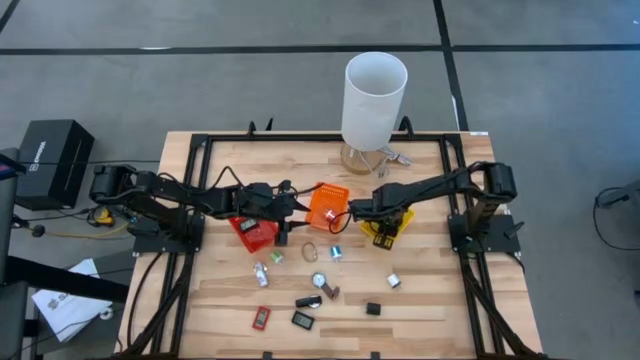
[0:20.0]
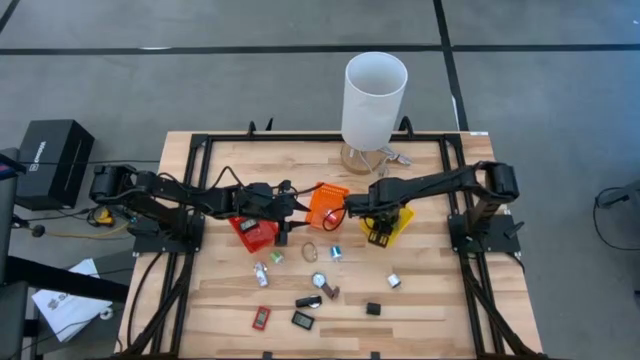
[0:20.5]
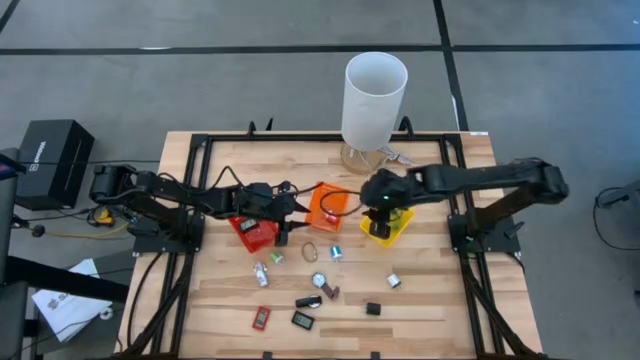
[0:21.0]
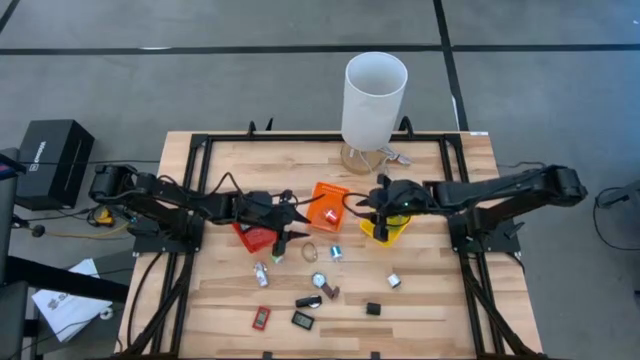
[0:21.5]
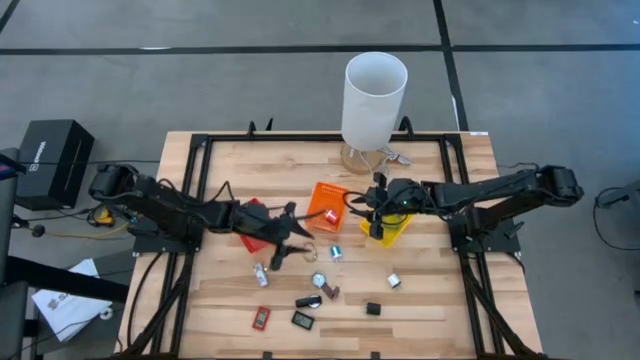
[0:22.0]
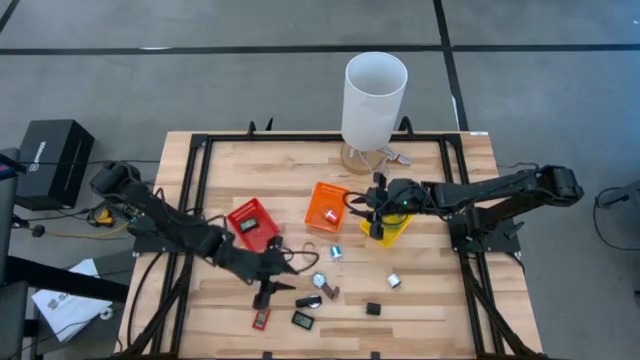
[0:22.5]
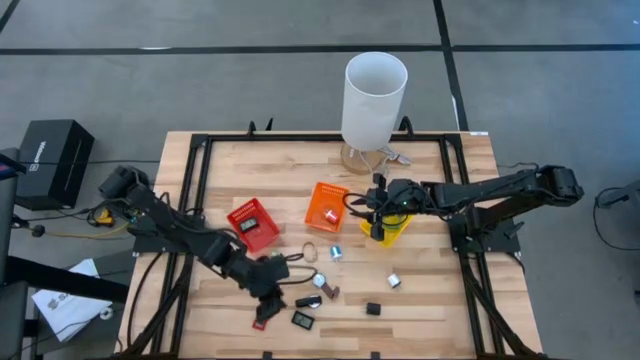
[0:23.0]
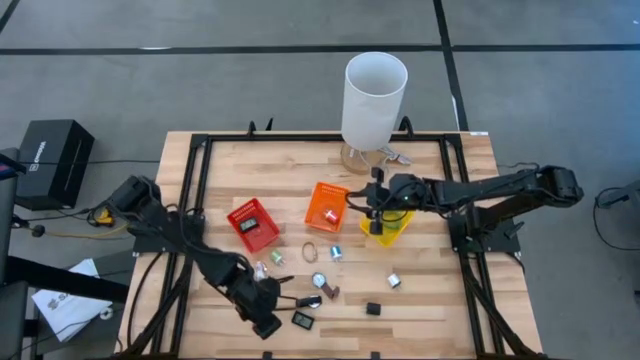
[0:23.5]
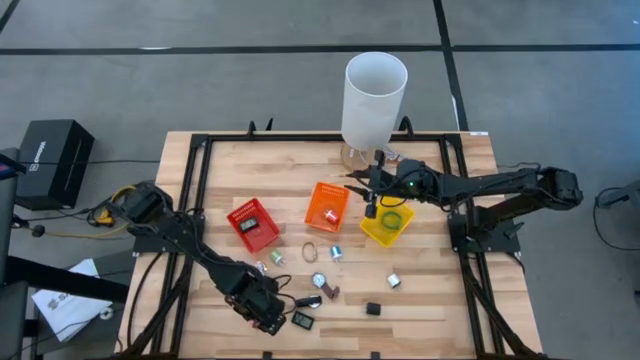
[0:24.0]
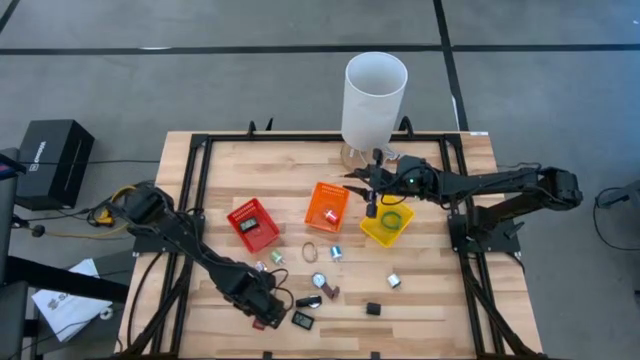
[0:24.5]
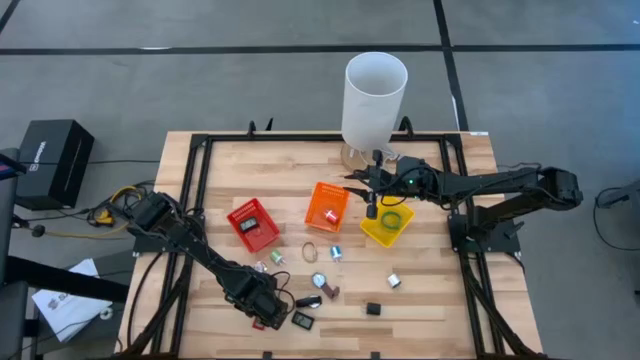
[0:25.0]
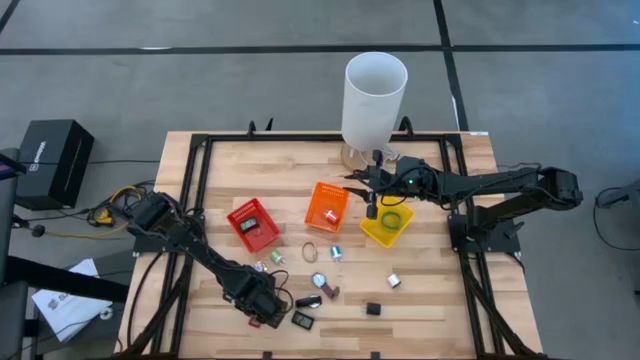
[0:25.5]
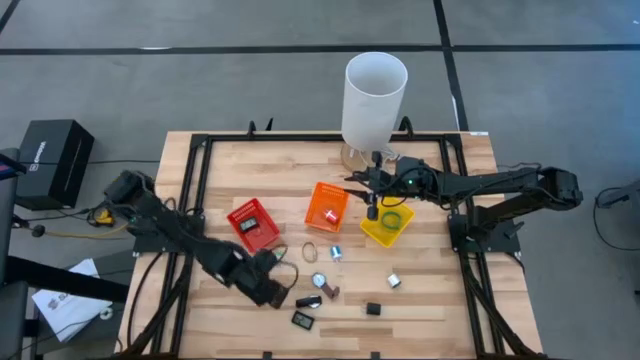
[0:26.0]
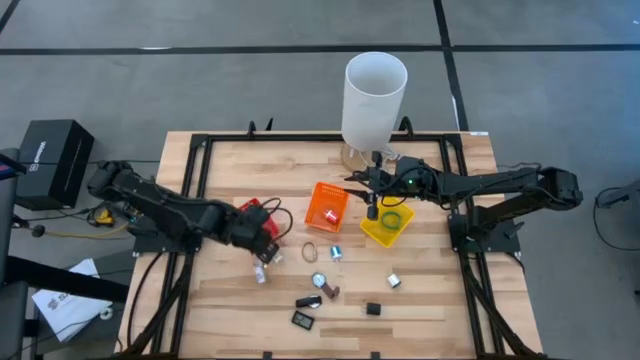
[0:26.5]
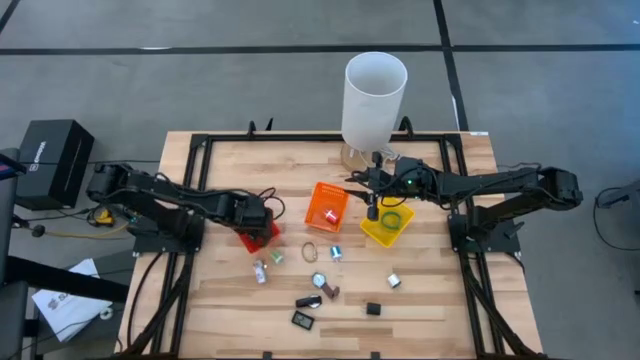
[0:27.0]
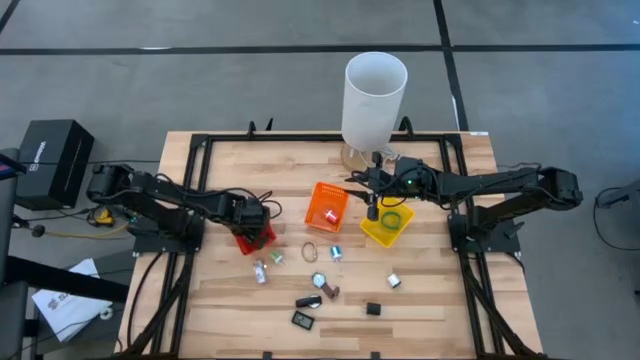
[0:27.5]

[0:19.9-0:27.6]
Task: Pick & Place Office items
Put the red digital clock into the red bin

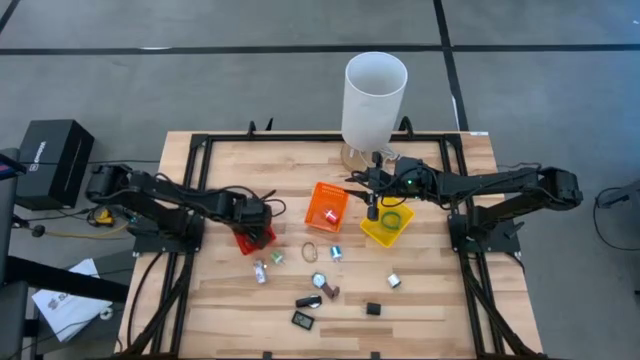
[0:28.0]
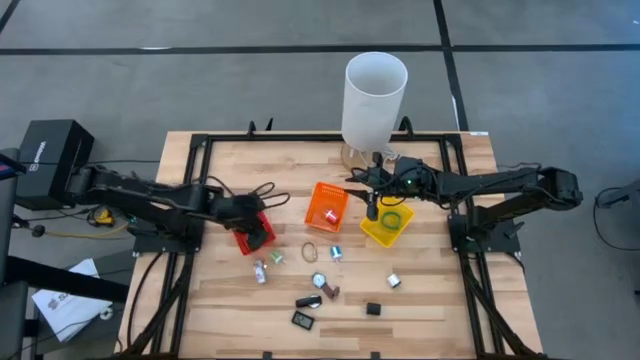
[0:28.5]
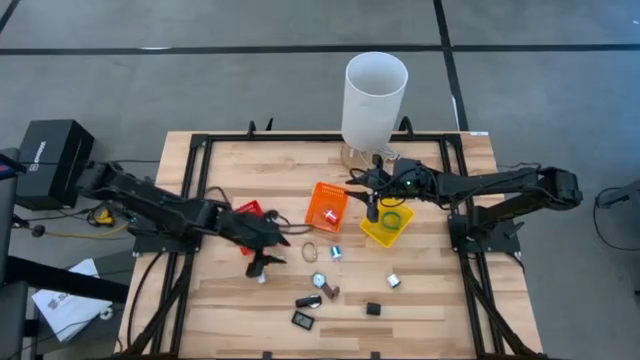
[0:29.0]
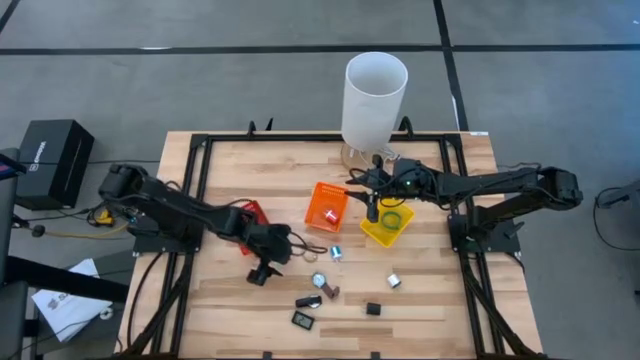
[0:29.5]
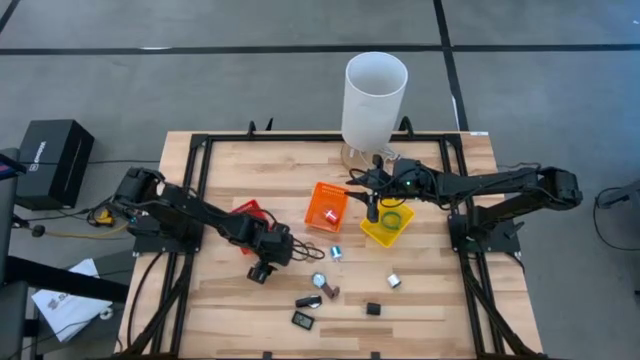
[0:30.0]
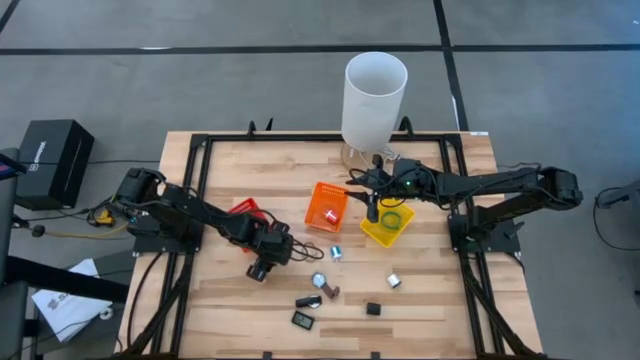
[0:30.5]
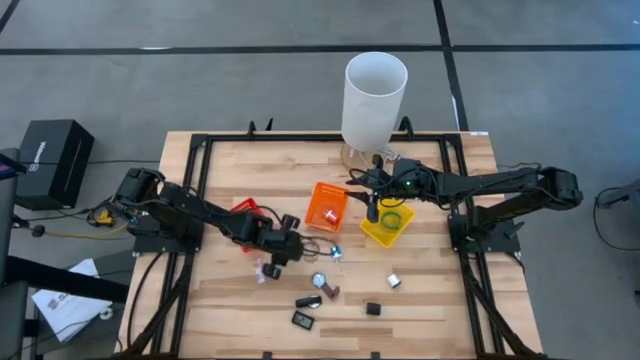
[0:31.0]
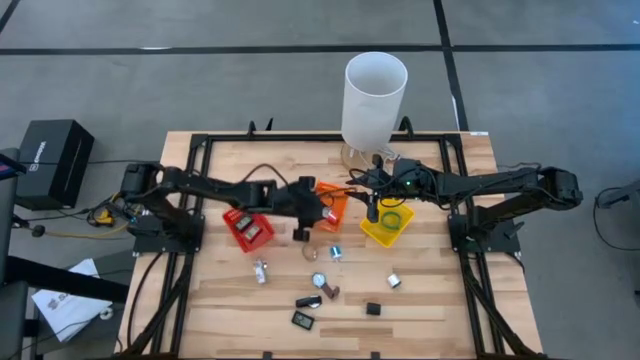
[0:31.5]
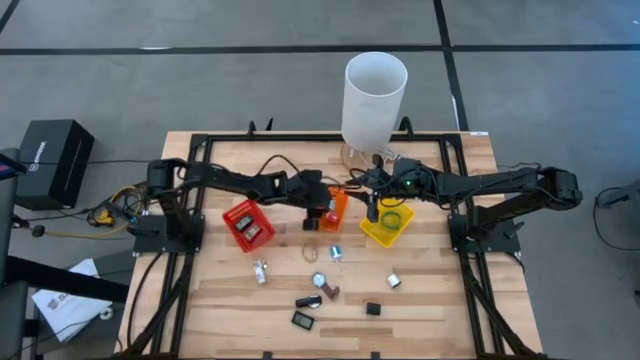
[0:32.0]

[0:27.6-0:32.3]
Put the green charger adapter into the orange bin

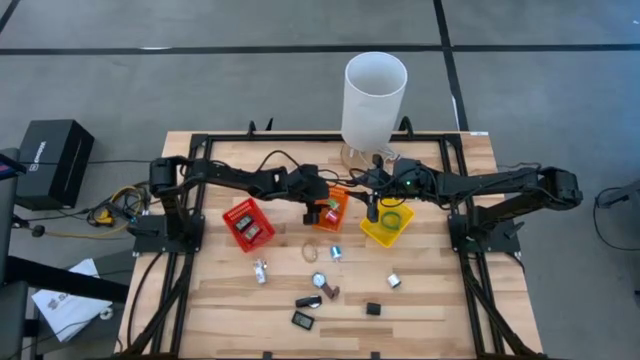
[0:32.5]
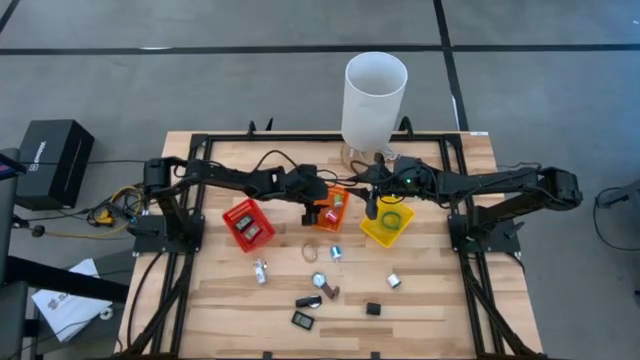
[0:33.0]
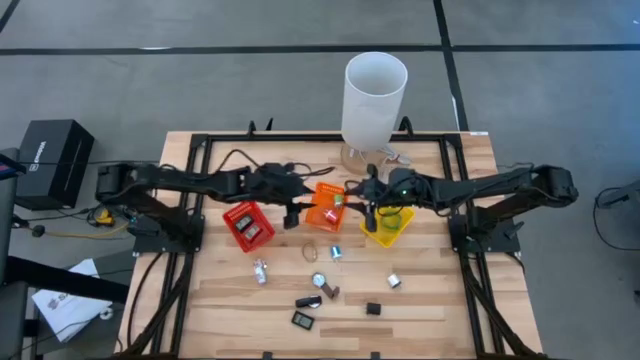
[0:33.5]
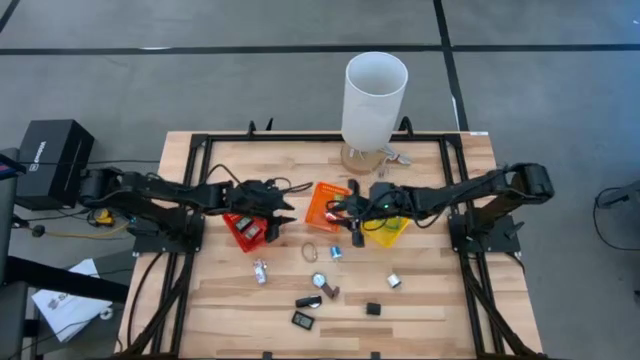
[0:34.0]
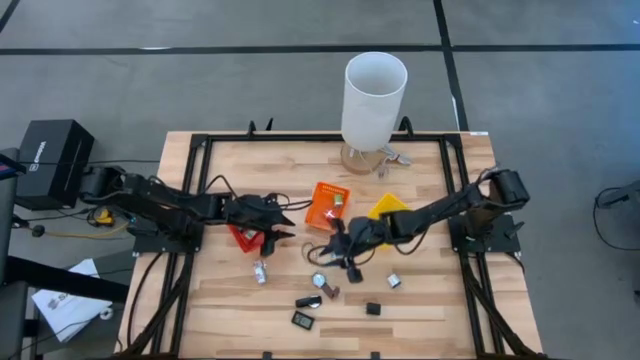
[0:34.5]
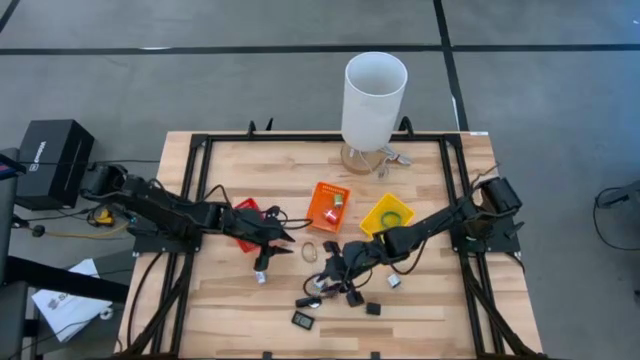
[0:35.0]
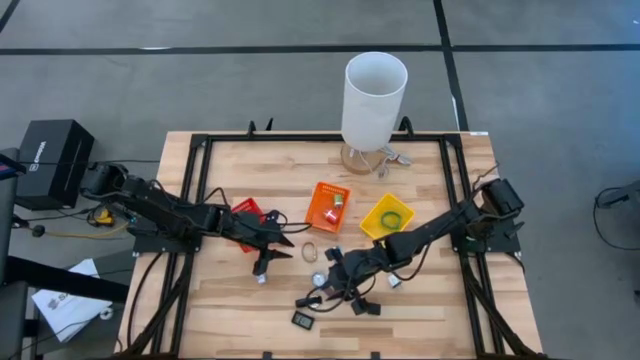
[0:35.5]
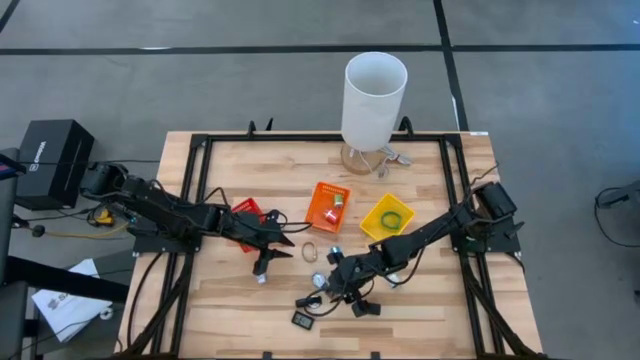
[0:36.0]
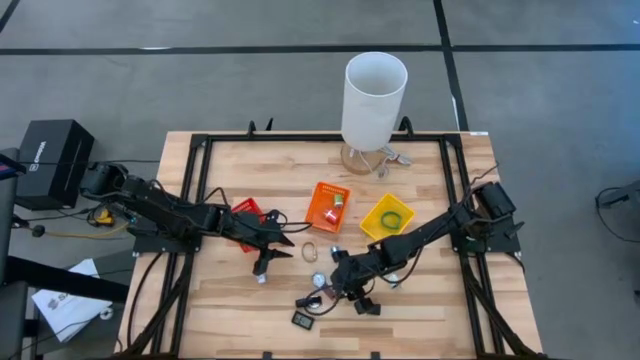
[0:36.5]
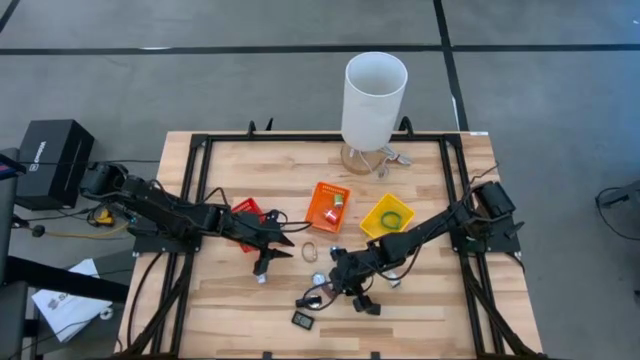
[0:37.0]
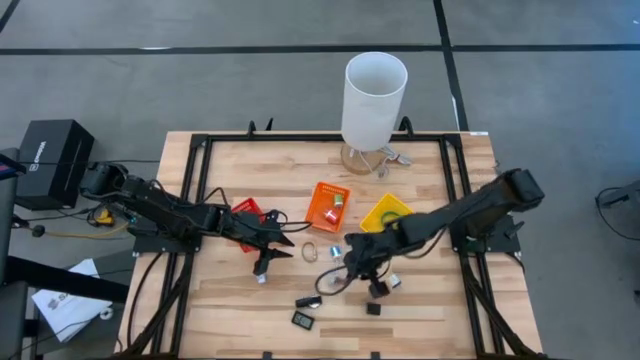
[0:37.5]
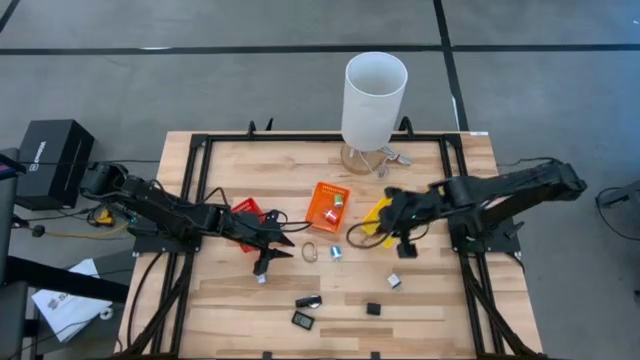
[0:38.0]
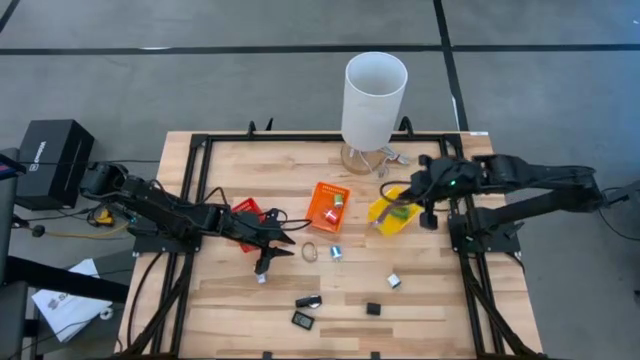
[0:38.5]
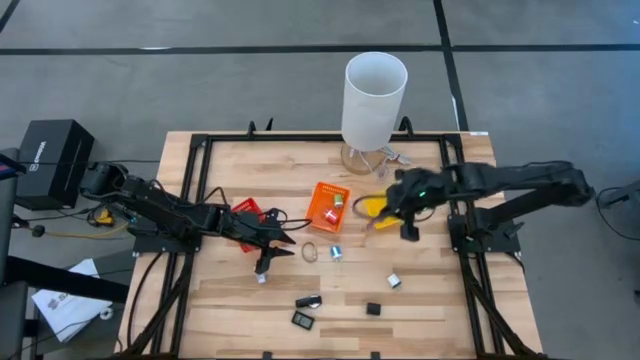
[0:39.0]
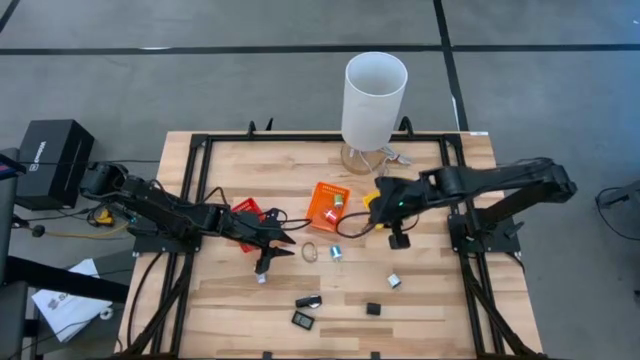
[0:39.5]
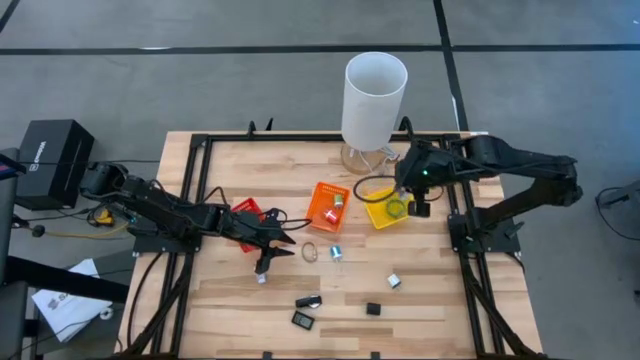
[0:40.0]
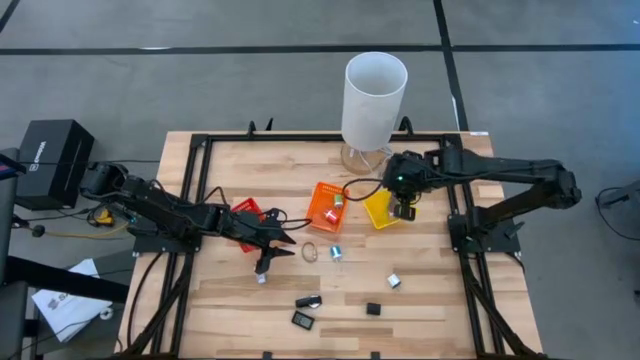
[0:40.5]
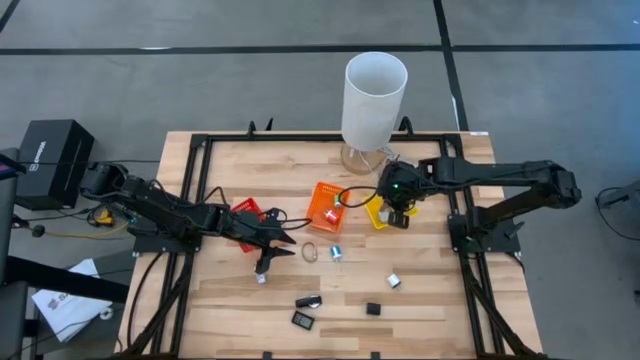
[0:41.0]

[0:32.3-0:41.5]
Put the dark brown wrist watch into the yellow bin
